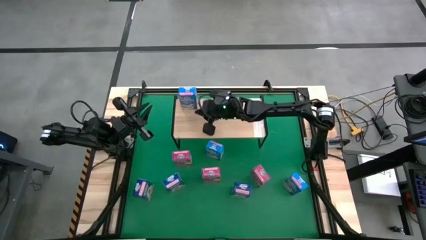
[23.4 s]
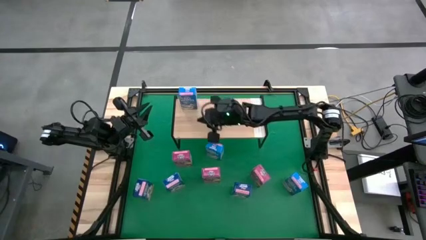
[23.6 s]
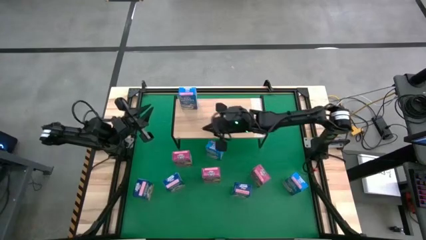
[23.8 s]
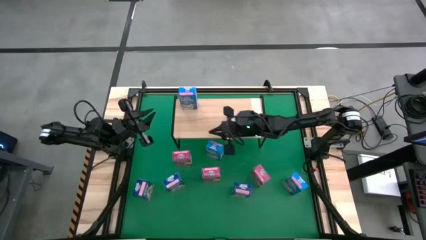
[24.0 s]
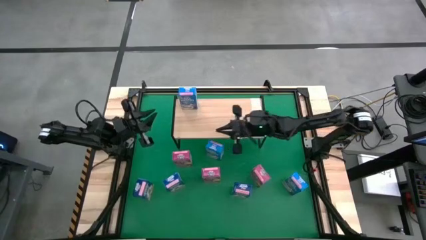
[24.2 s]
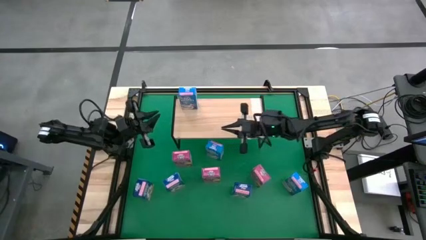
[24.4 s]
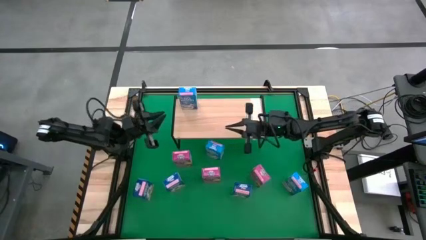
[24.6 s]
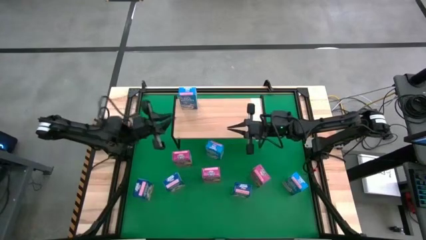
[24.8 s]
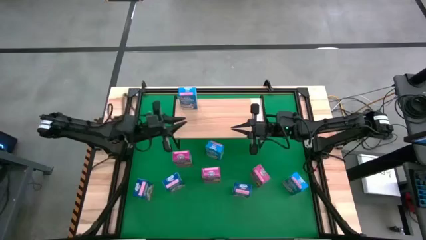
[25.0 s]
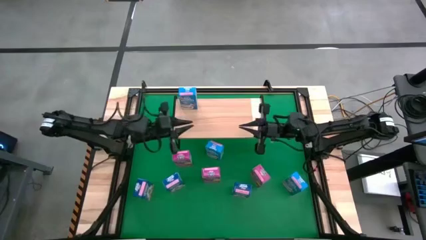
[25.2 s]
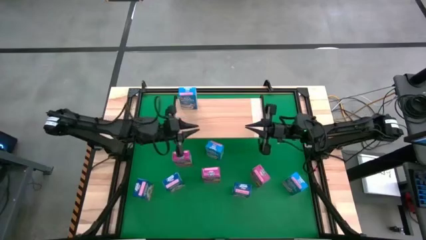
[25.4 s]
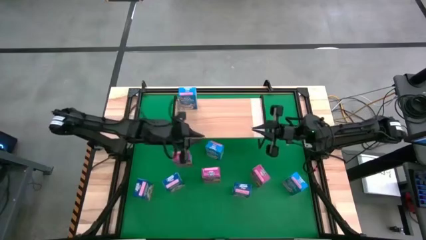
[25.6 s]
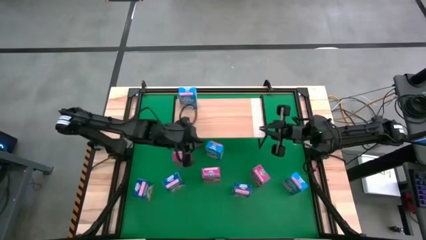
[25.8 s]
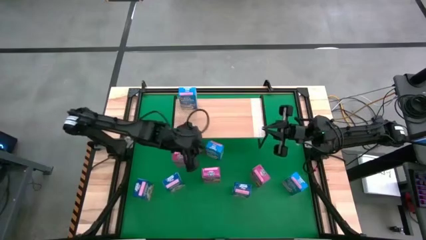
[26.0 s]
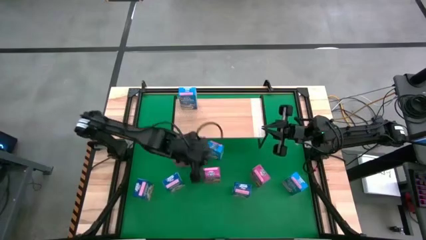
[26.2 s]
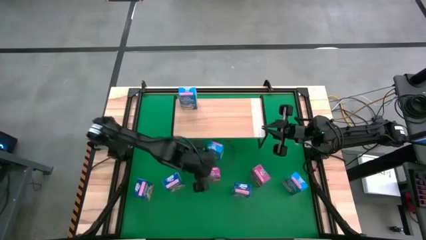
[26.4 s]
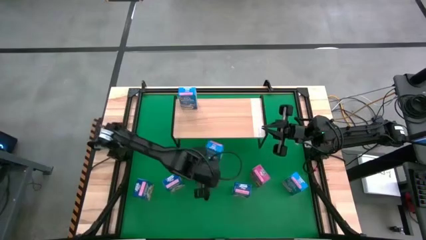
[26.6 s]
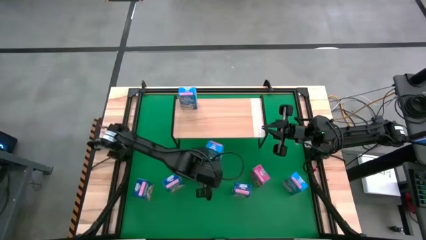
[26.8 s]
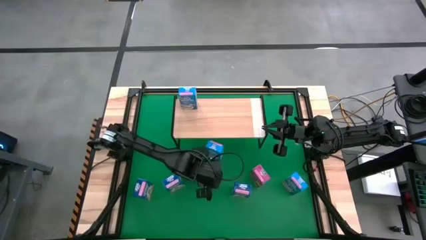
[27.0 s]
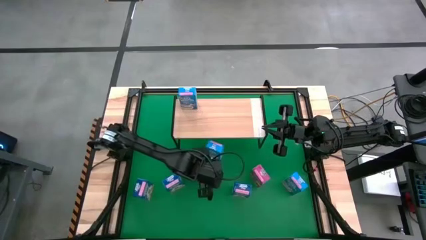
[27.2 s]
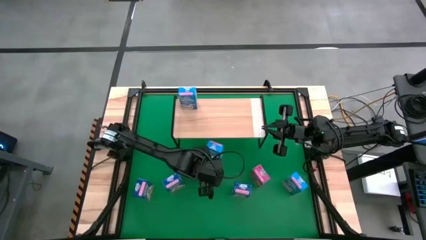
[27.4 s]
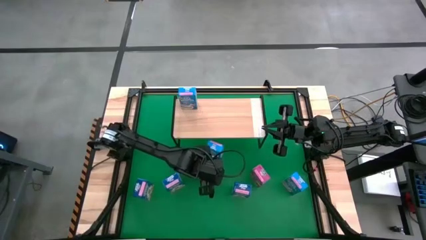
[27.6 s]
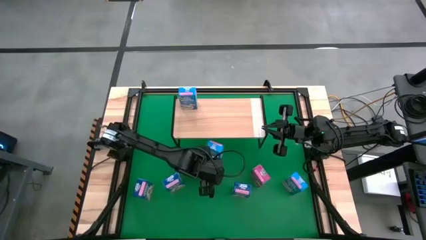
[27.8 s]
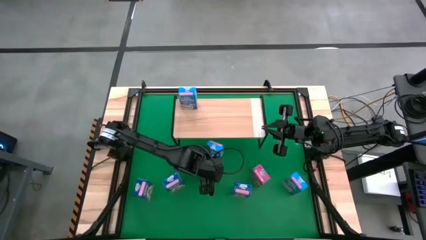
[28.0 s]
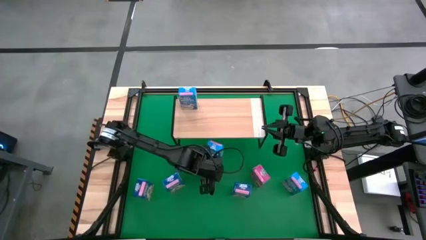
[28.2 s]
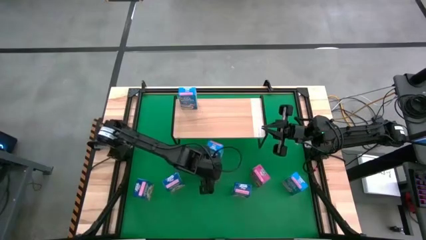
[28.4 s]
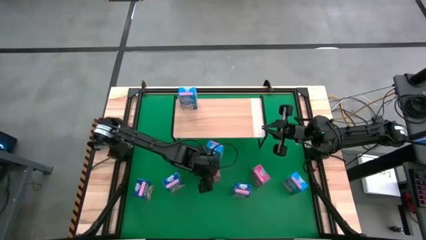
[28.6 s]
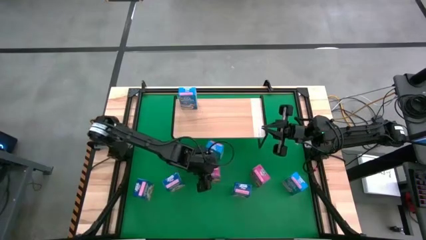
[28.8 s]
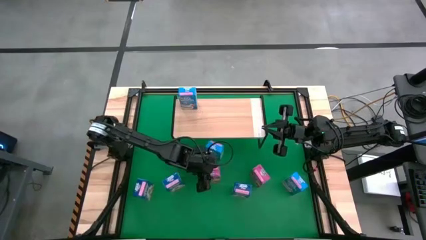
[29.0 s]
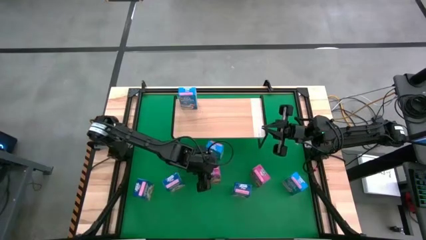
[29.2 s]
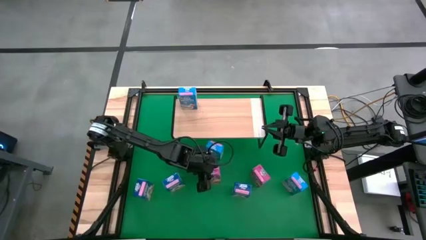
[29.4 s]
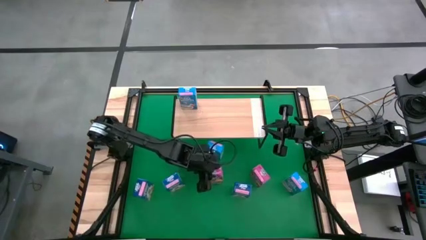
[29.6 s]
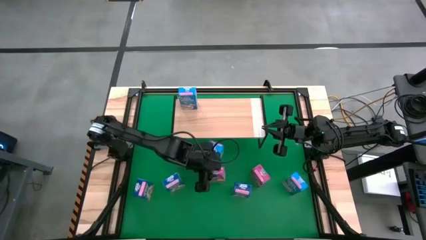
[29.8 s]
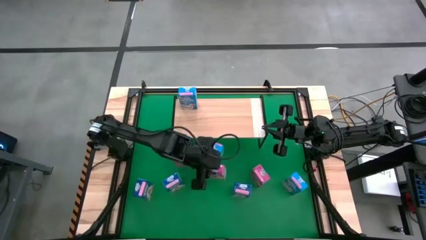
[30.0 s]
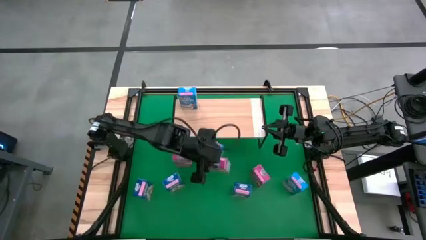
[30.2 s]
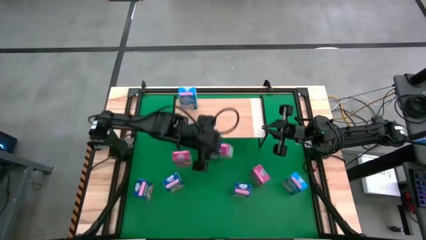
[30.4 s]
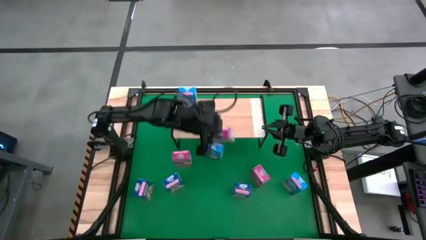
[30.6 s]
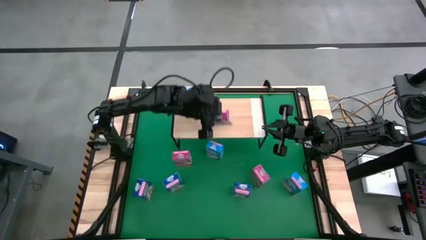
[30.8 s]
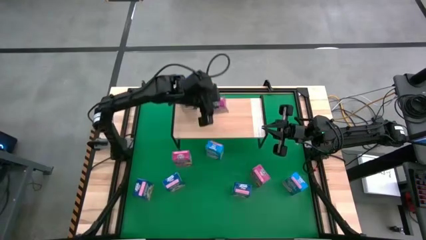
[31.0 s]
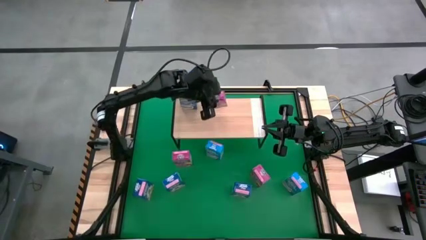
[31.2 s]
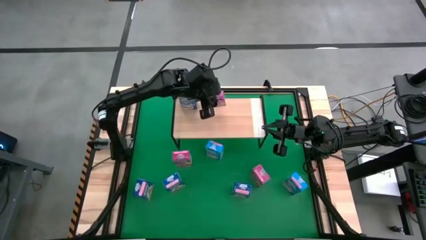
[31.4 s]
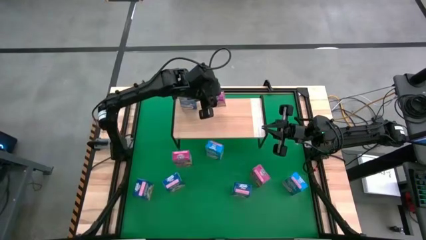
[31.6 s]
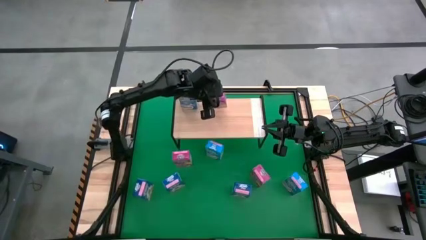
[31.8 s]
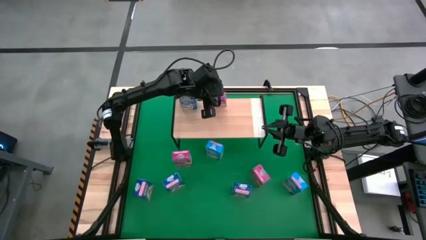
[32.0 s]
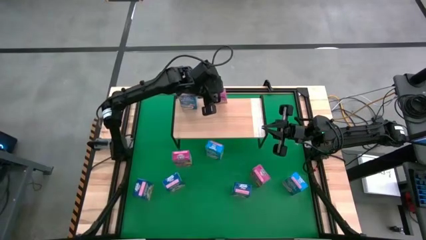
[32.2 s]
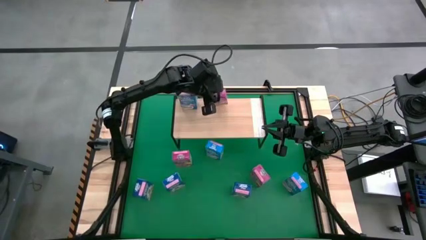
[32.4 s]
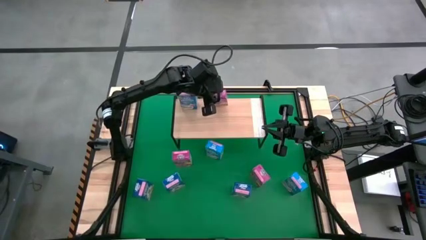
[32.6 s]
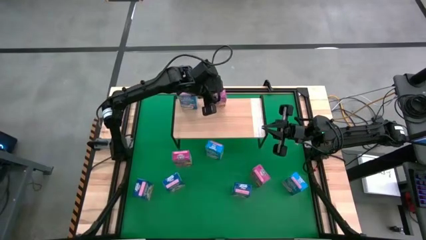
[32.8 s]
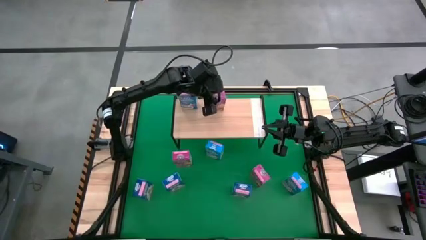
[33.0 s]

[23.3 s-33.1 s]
Task: Stack cereal on shelf
Put the center violet cereal box on the shelf

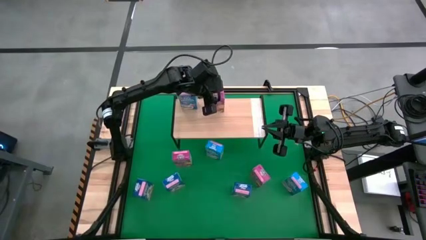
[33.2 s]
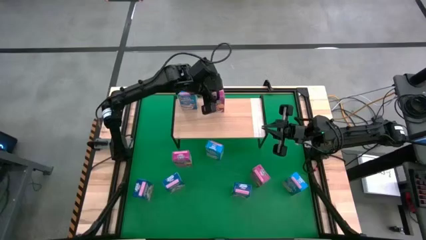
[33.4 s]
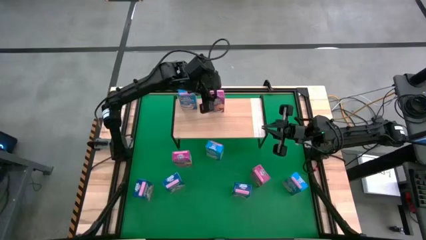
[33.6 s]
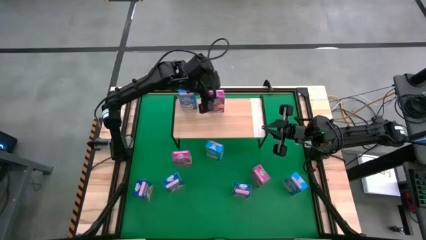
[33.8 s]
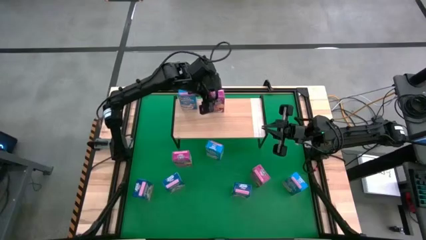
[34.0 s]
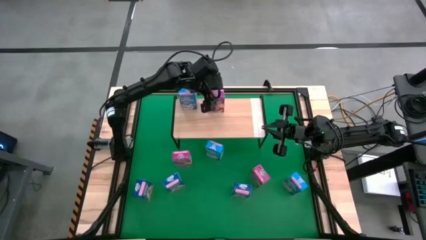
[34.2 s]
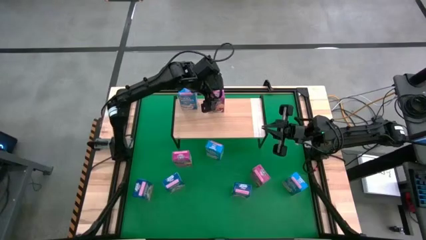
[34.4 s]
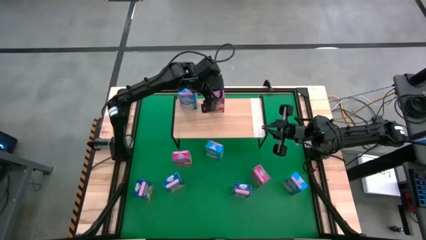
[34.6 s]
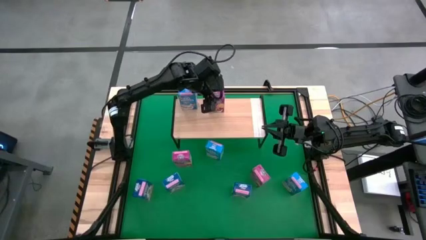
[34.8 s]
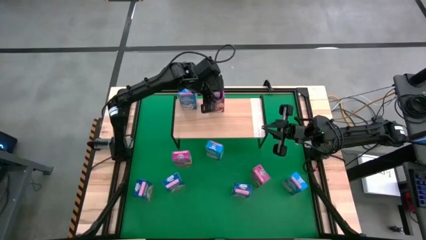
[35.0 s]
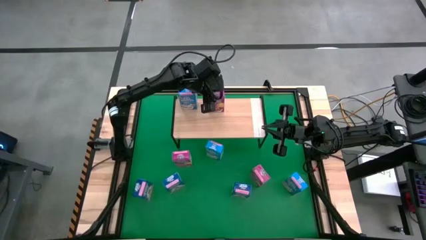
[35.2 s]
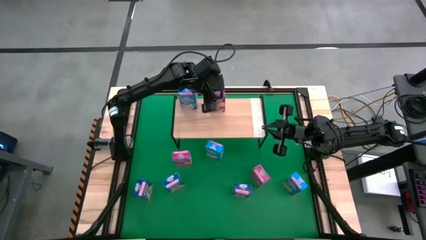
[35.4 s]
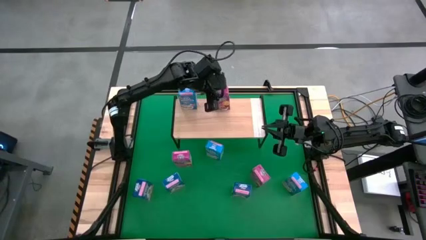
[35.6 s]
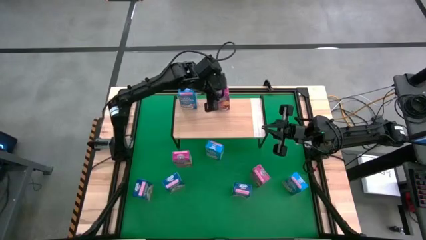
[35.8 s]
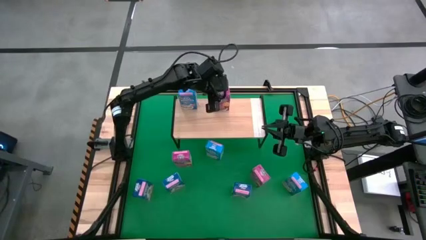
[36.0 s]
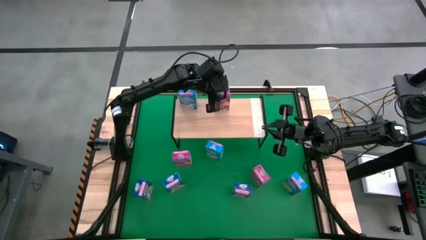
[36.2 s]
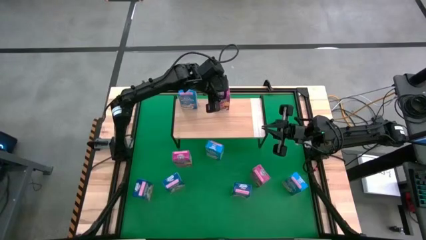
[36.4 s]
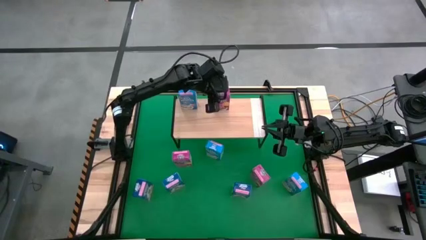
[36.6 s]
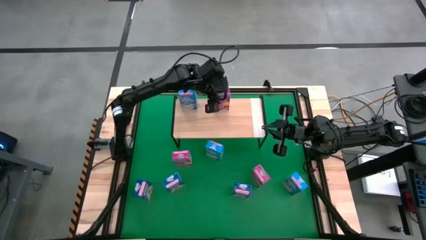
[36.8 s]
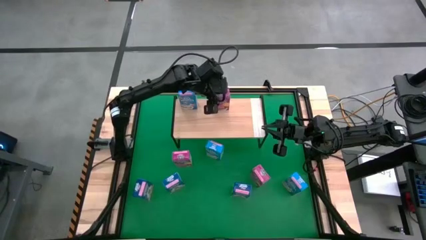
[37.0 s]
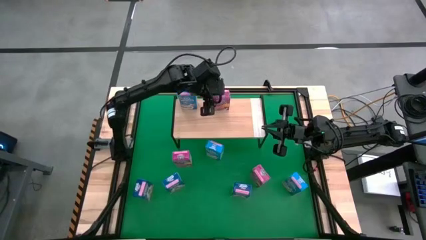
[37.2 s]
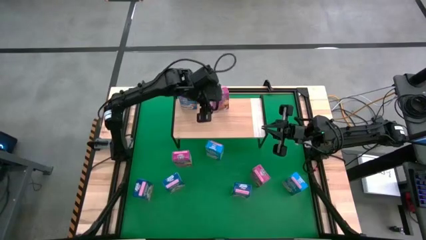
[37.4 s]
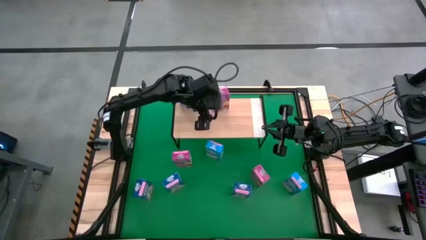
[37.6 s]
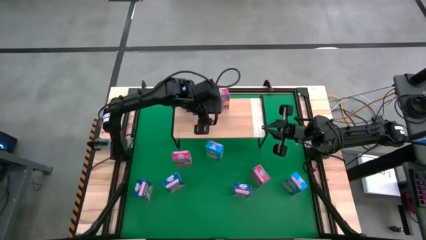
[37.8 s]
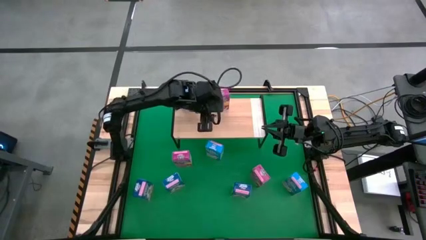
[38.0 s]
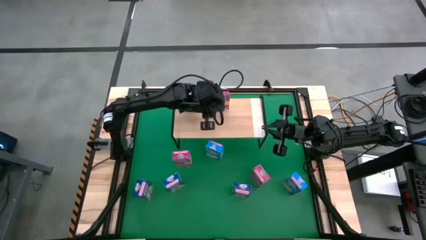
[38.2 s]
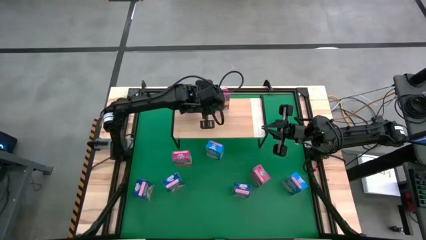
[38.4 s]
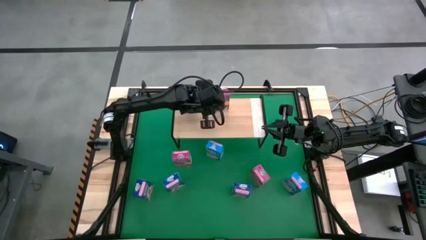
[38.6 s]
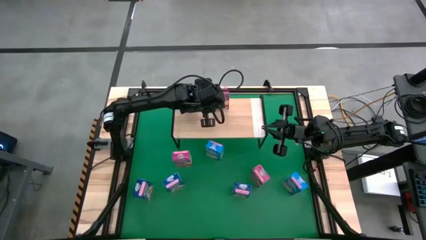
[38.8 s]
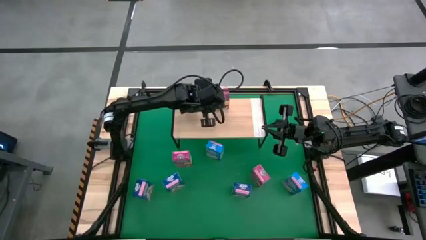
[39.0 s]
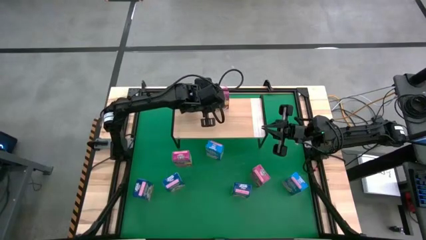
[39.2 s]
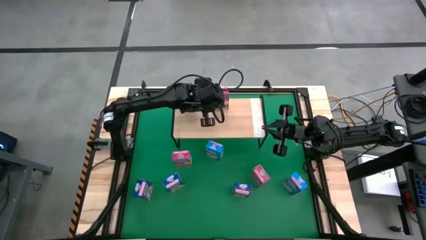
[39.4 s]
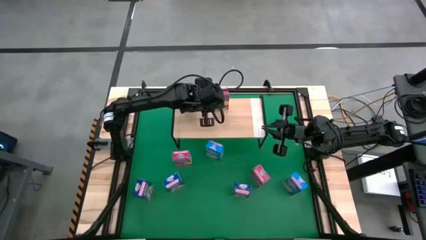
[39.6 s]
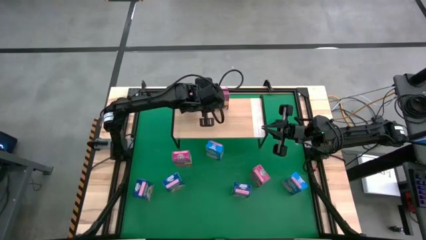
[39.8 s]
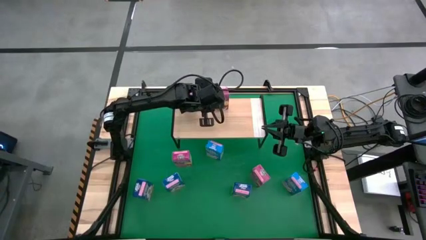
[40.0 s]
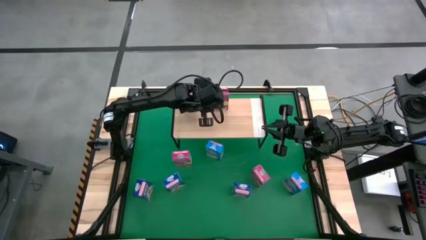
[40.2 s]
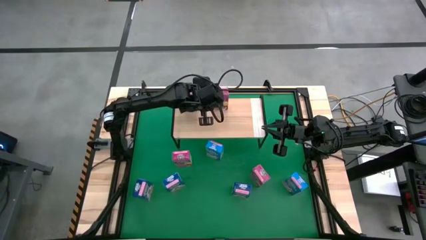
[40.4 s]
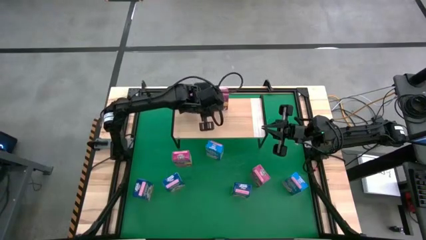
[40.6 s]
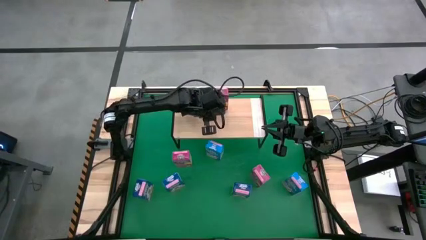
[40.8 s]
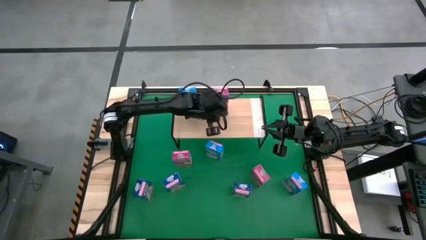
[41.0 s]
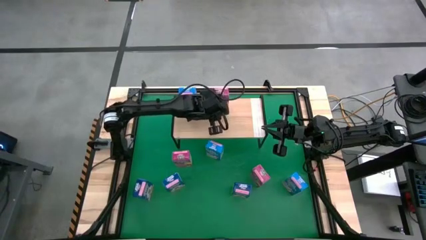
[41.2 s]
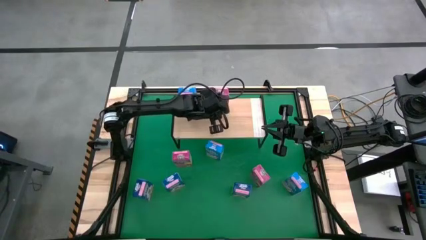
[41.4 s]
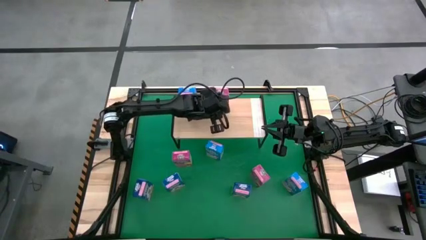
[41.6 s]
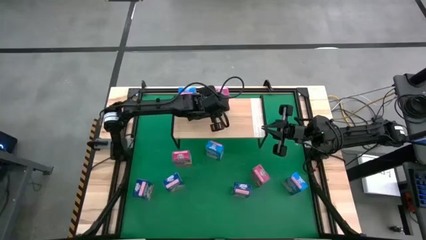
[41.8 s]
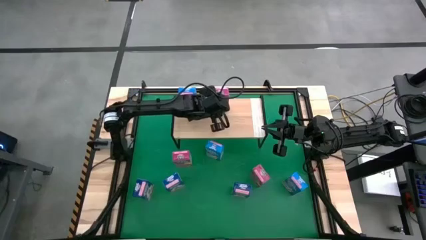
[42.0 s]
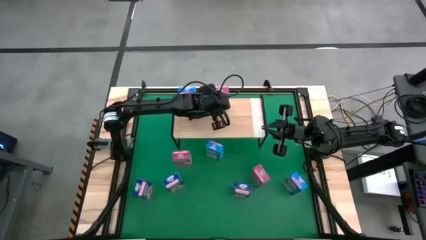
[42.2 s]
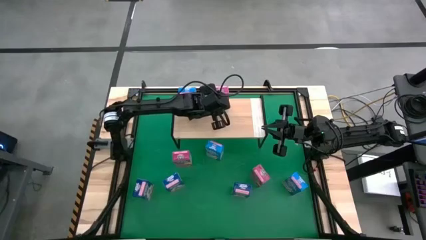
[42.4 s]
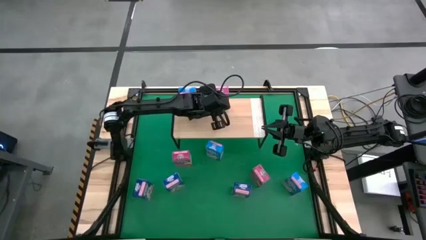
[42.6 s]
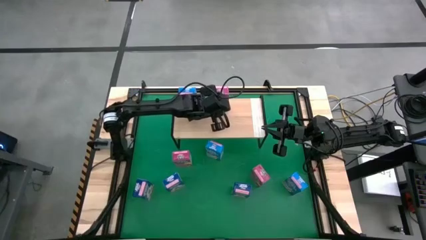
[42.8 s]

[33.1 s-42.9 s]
Put the center violet cereal box on the shelf
